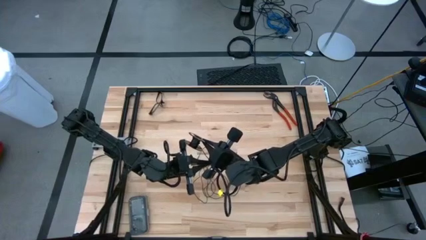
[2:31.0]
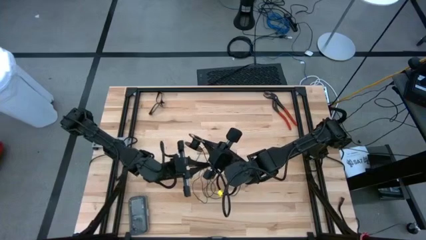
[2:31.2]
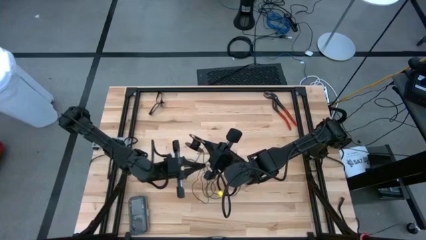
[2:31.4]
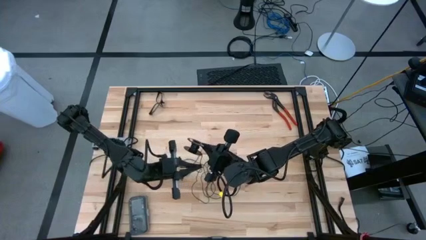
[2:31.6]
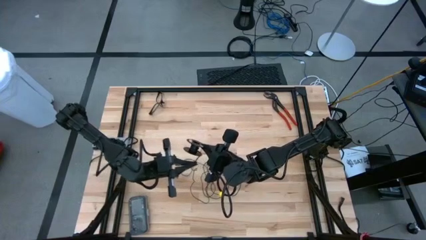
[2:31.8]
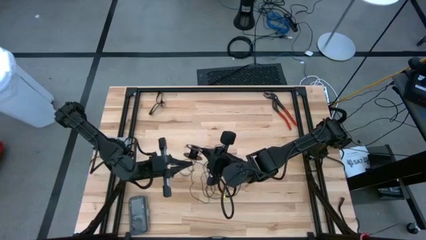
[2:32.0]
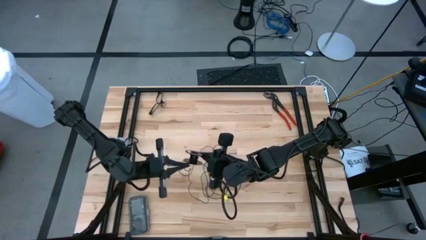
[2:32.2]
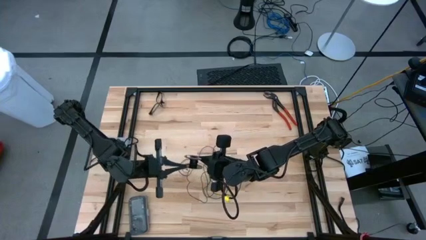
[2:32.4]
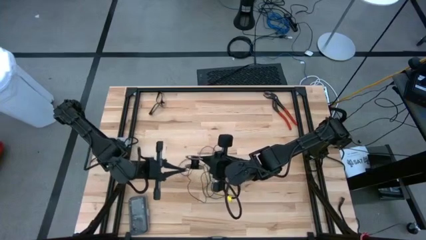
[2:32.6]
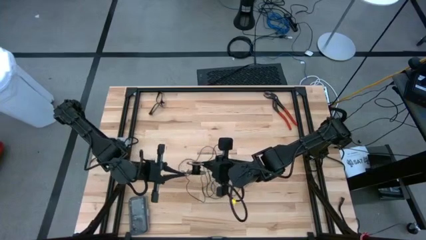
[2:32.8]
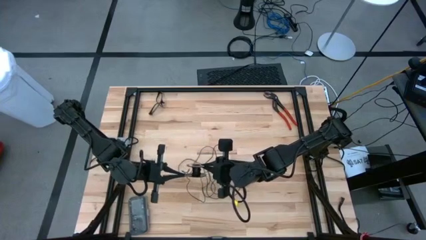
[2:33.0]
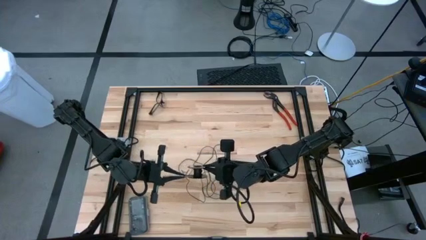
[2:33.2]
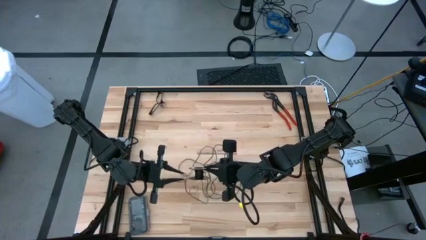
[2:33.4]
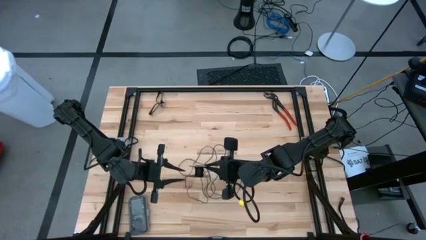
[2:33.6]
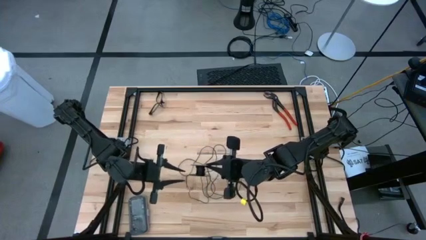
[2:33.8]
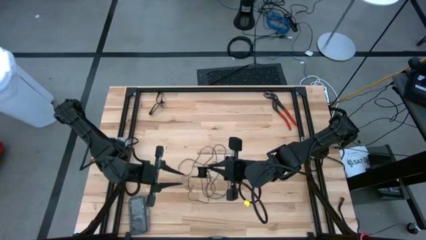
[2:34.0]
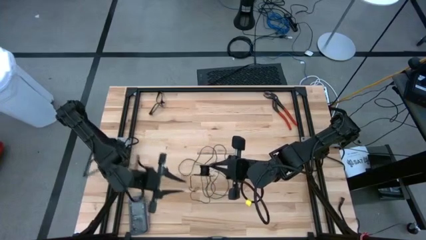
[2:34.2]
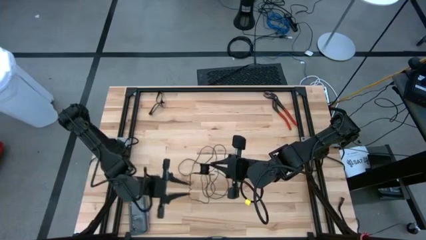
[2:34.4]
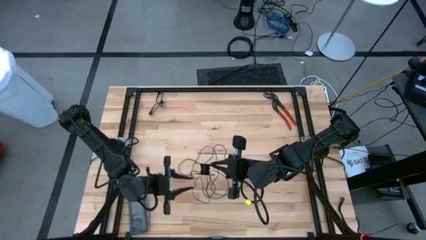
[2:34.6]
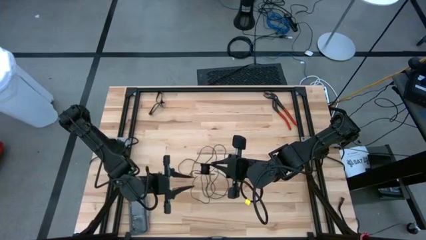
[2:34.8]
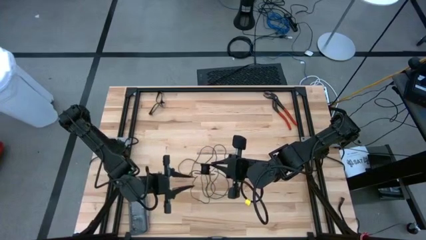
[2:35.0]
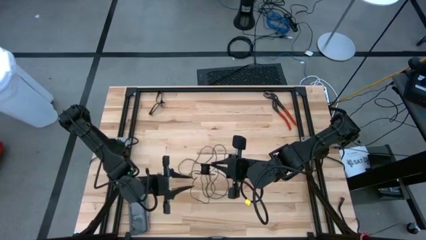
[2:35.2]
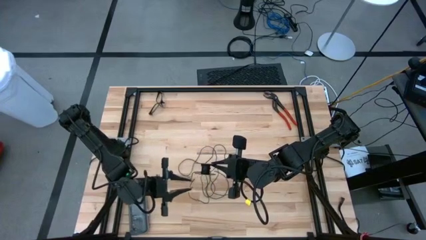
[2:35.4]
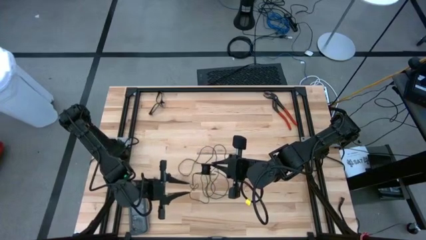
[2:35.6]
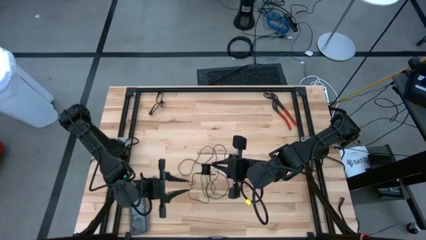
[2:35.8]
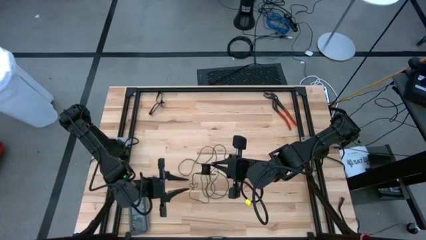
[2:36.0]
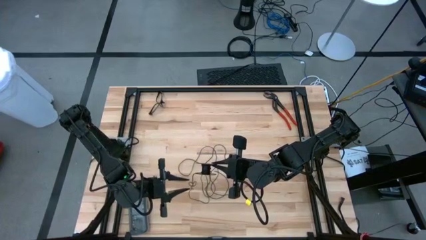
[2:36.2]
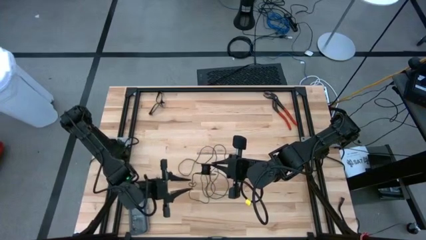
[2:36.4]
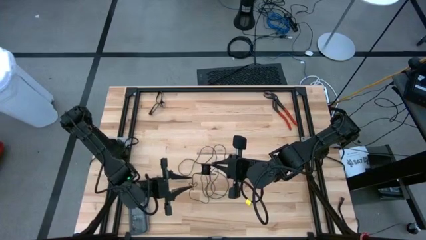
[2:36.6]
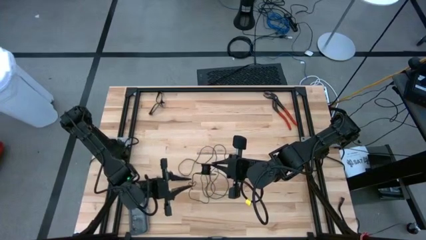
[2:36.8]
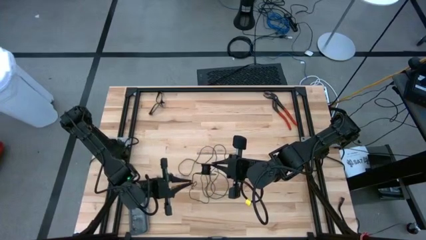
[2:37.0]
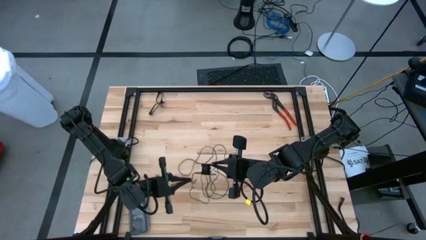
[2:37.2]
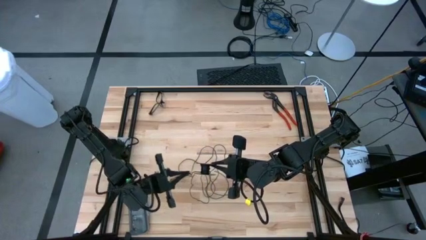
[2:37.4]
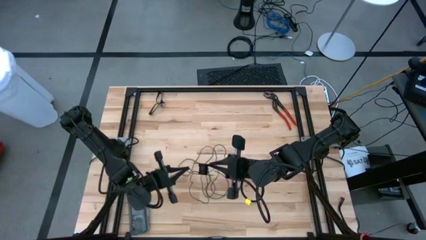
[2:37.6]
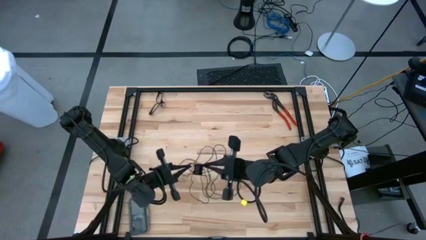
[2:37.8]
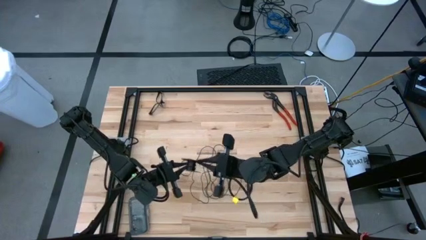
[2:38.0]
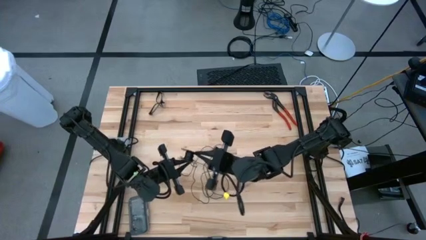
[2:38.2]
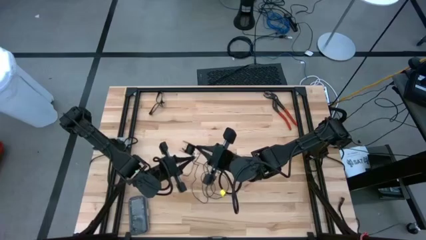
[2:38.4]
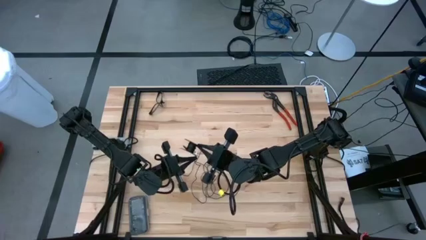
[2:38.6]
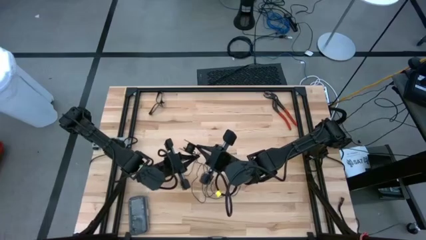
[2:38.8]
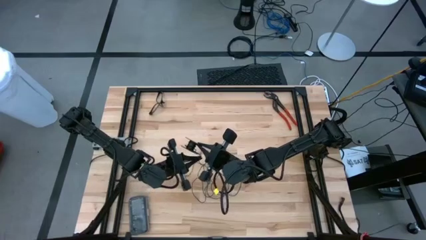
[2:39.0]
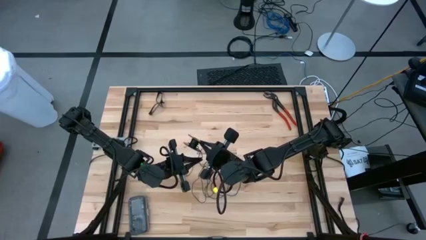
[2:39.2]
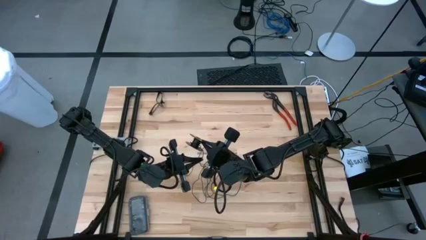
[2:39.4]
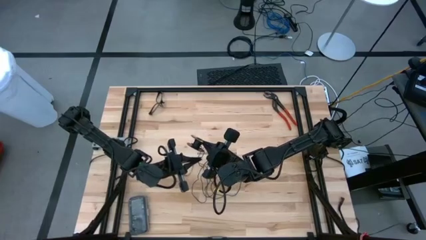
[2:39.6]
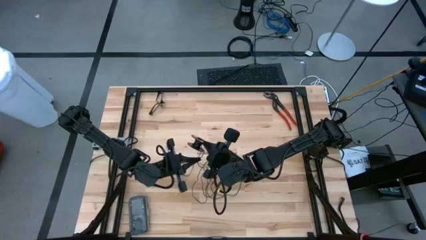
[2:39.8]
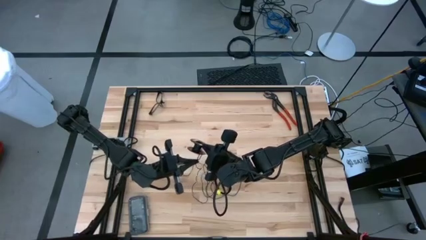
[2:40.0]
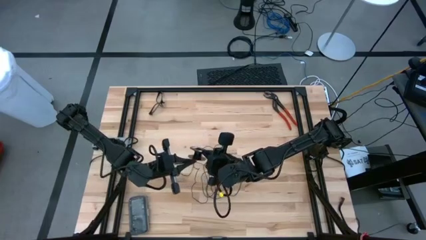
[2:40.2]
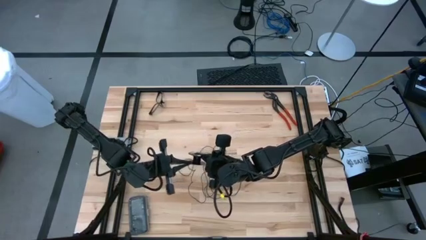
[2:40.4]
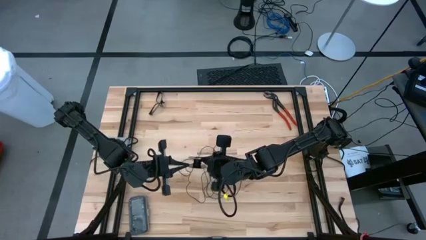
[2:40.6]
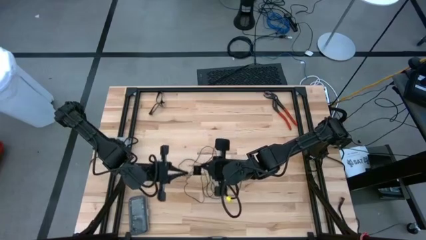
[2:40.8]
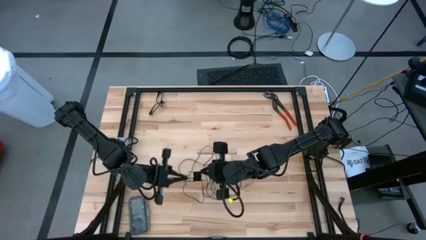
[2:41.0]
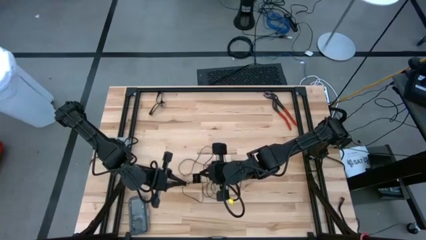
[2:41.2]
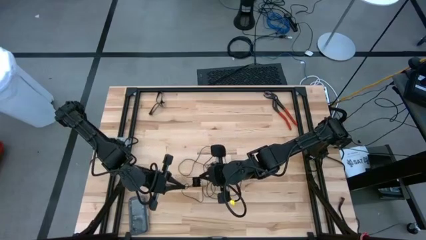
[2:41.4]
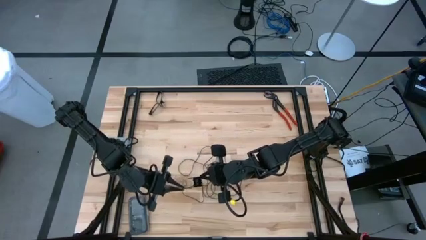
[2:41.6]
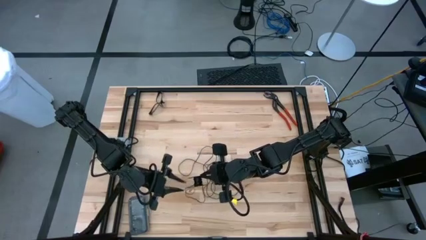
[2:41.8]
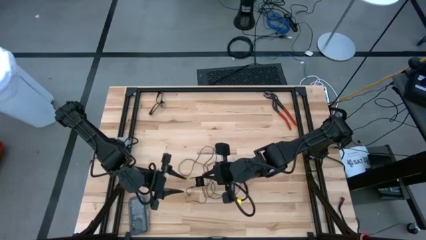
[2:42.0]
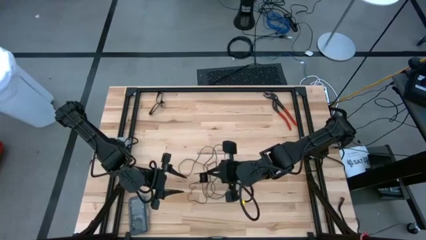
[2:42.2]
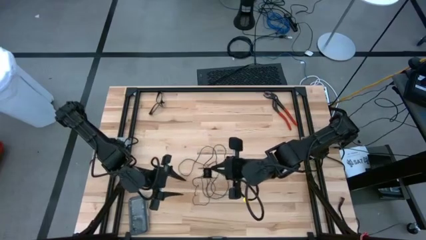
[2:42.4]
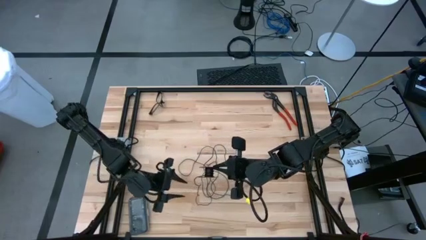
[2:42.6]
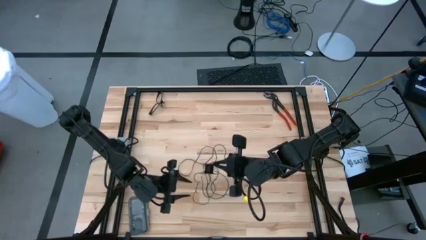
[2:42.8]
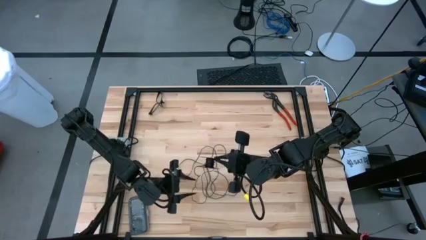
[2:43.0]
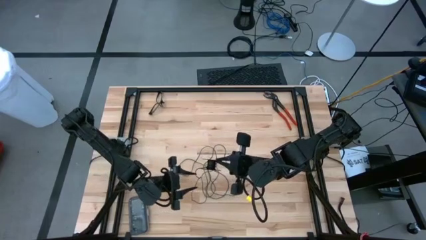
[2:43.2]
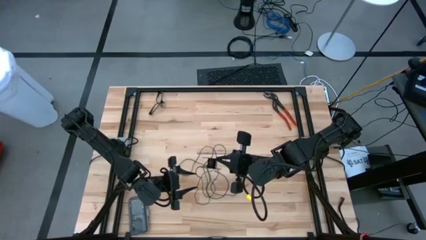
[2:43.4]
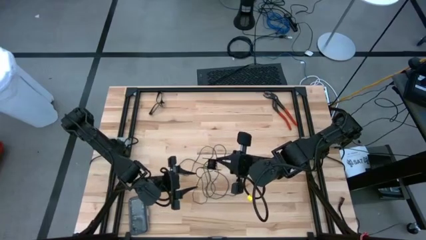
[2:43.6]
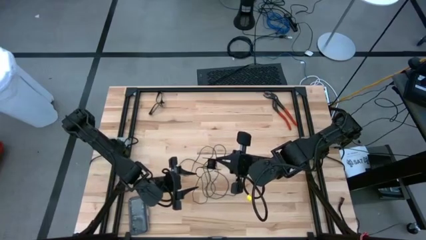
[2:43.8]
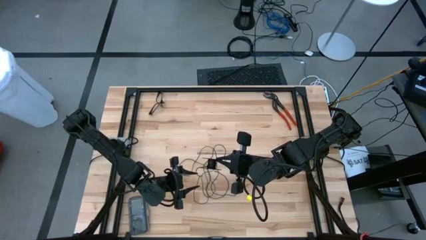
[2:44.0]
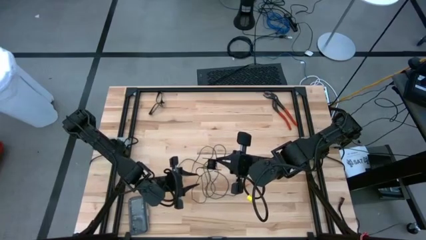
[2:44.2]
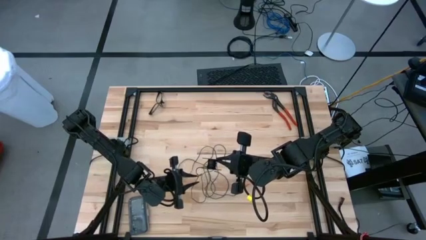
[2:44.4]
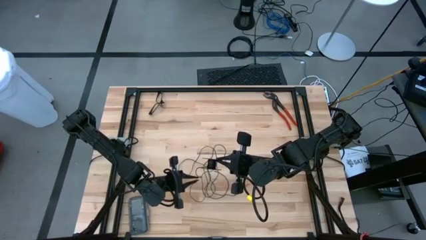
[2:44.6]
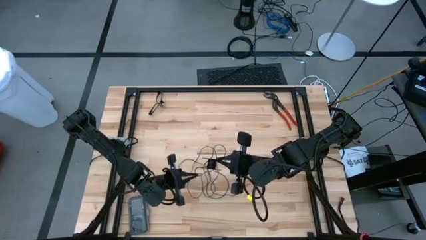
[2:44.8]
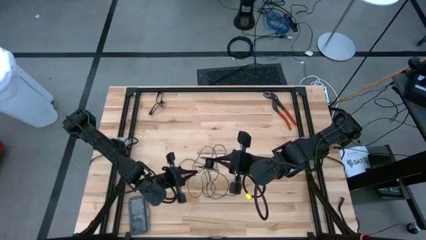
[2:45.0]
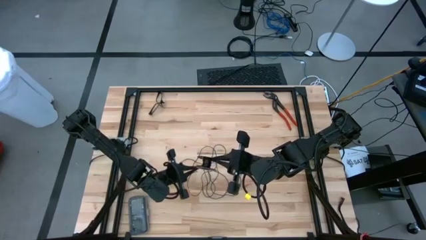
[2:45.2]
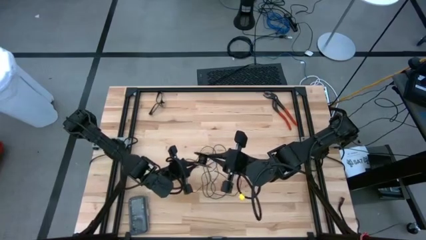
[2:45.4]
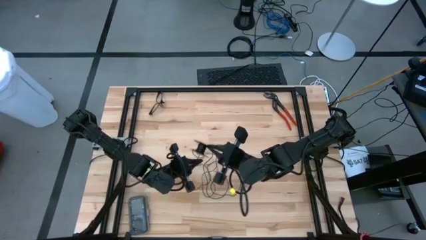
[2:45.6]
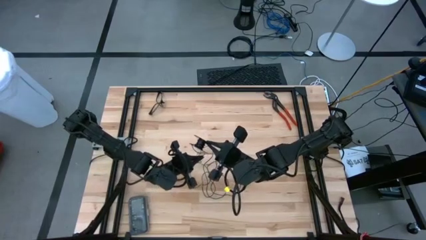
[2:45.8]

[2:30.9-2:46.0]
Task: Coil cords
Coil the black wire onto the spool

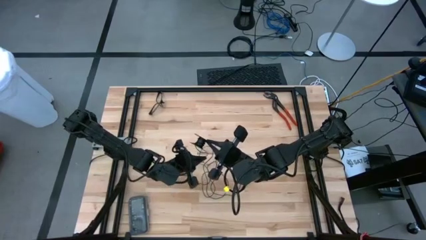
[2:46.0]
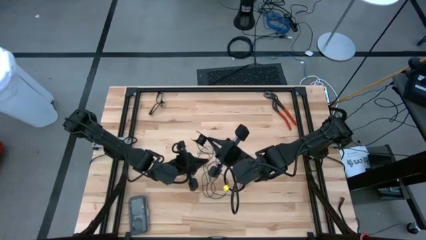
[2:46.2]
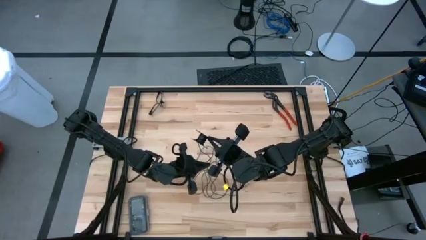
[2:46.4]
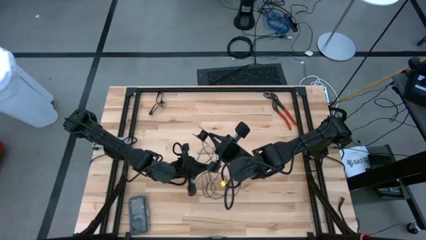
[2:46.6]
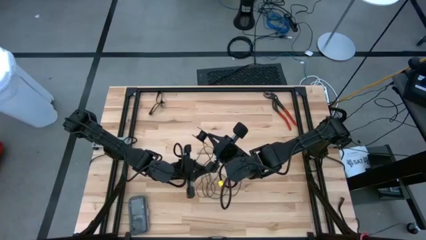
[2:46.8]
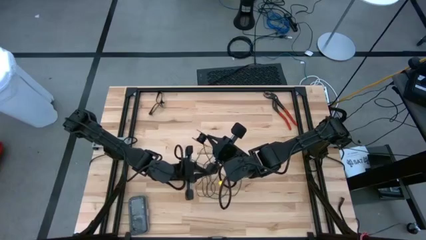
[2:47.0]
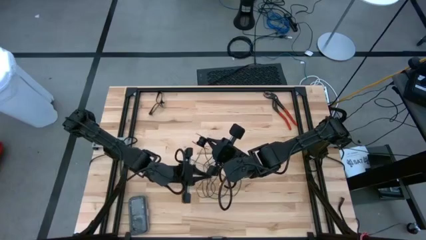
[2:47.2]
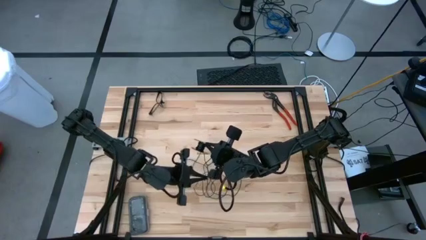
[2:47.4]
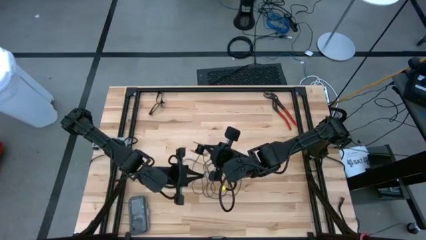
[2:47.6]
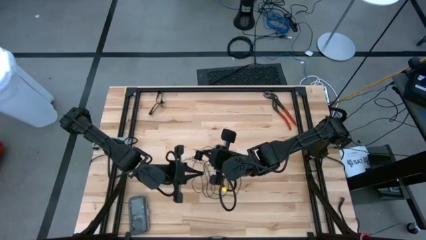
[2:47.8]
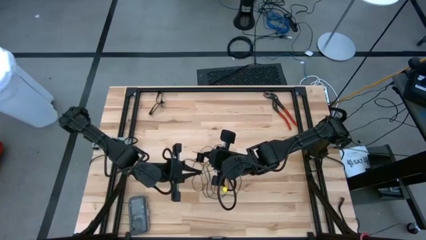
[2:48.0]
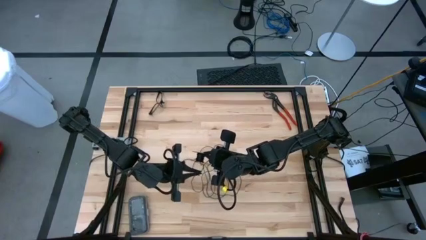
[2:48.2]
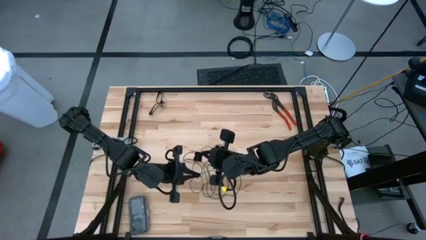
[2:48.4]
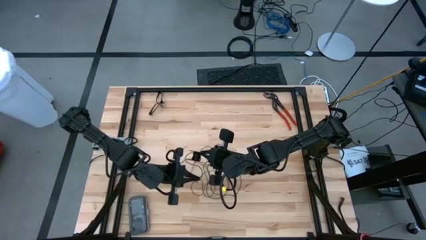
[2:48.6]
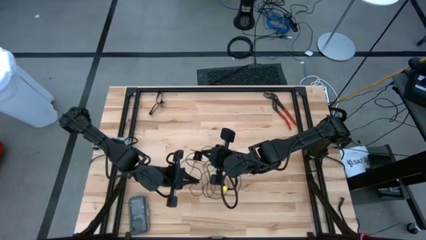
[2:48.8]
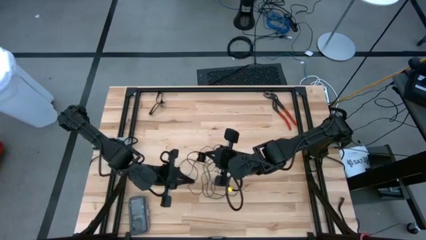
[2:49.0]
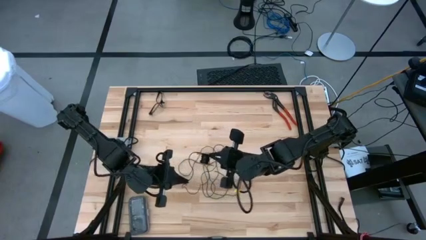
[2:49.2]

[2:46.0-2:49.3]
Coil the black wire onto the spool
